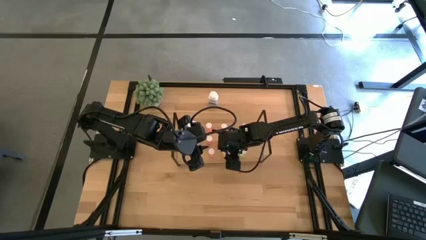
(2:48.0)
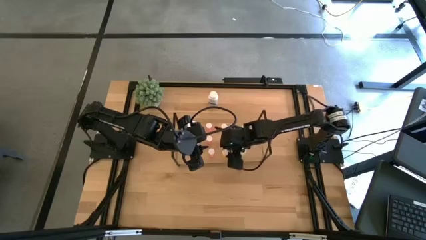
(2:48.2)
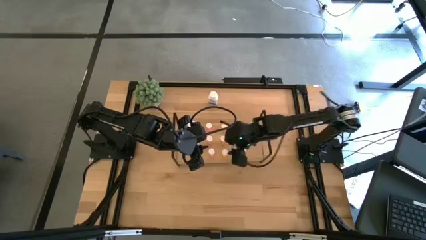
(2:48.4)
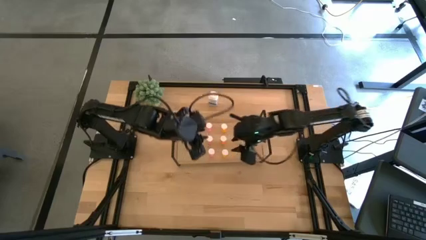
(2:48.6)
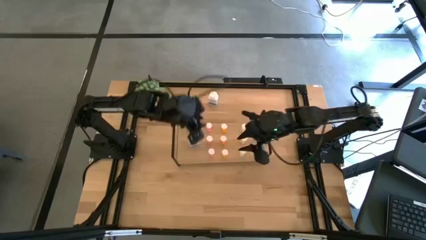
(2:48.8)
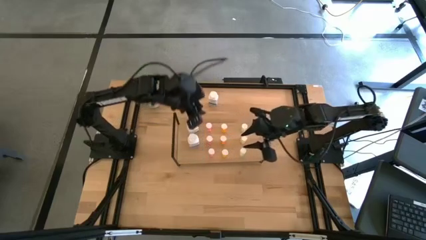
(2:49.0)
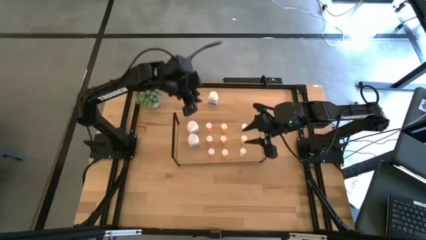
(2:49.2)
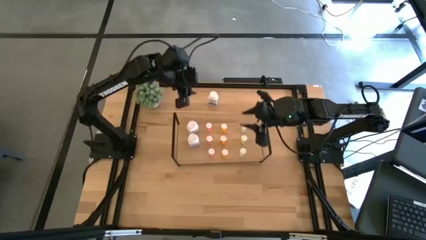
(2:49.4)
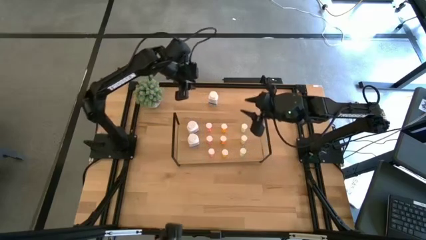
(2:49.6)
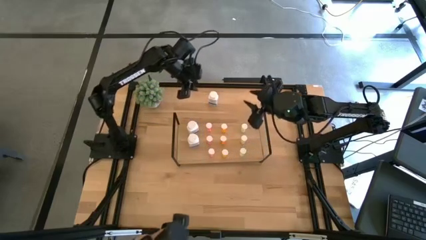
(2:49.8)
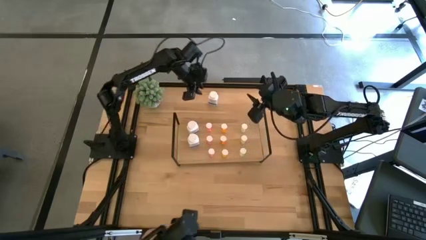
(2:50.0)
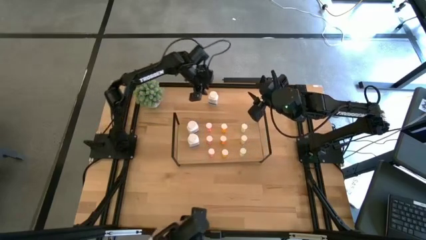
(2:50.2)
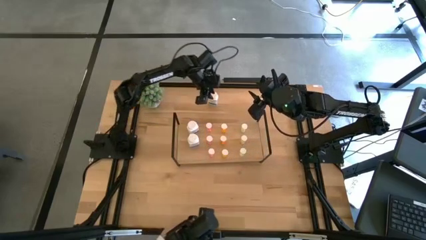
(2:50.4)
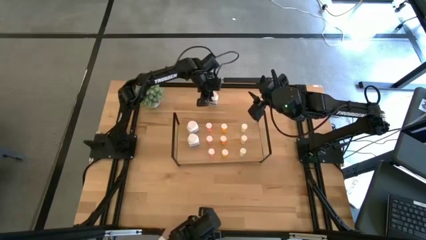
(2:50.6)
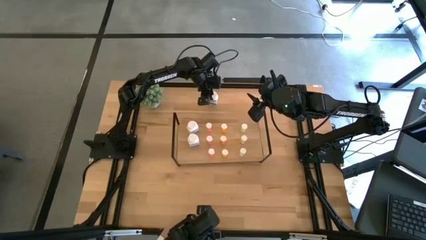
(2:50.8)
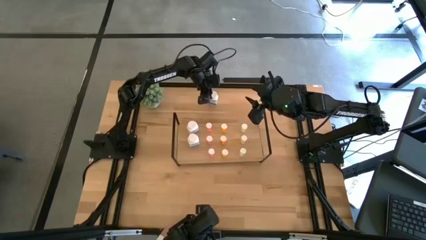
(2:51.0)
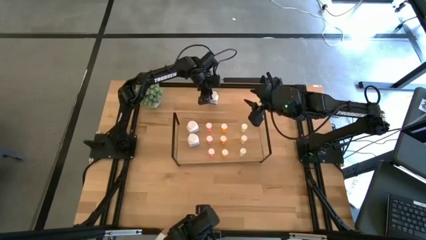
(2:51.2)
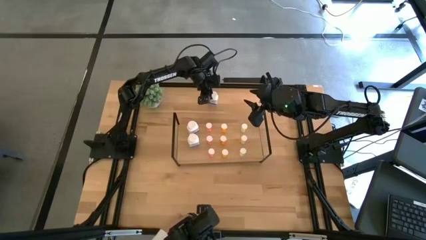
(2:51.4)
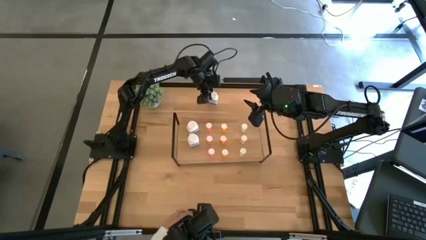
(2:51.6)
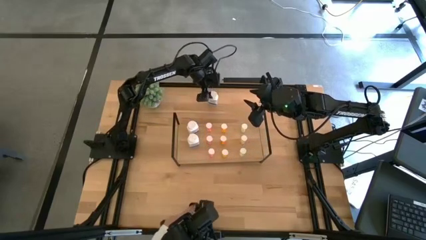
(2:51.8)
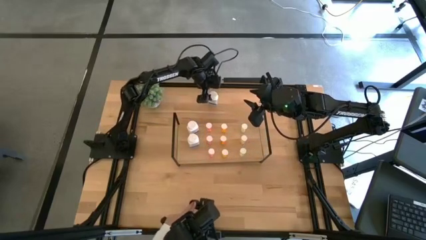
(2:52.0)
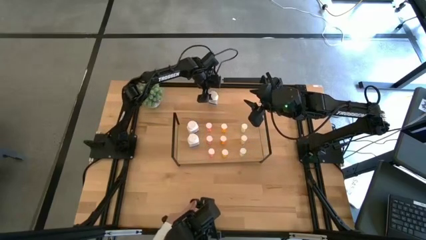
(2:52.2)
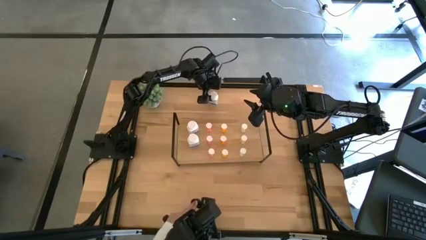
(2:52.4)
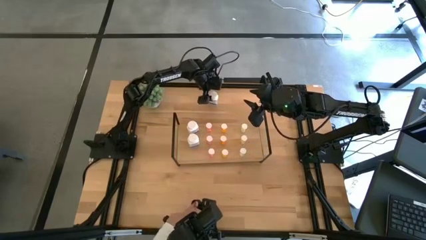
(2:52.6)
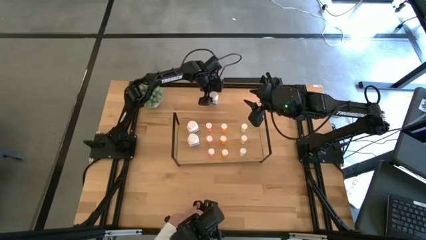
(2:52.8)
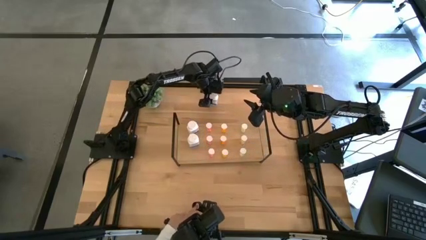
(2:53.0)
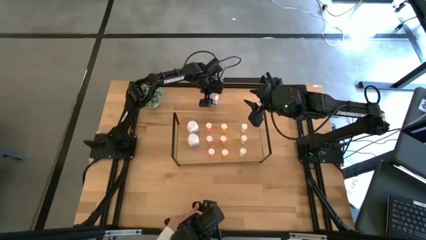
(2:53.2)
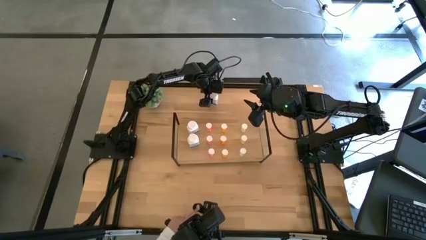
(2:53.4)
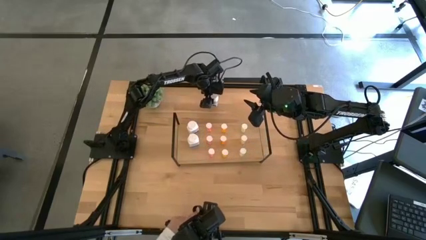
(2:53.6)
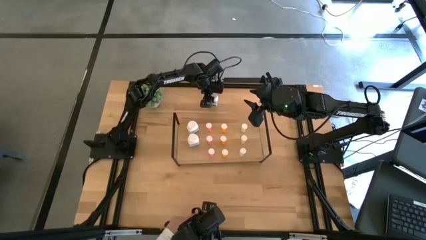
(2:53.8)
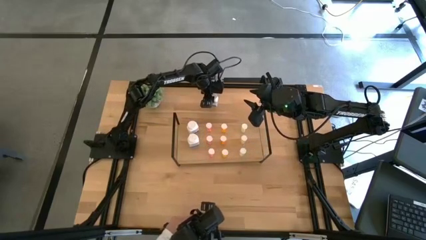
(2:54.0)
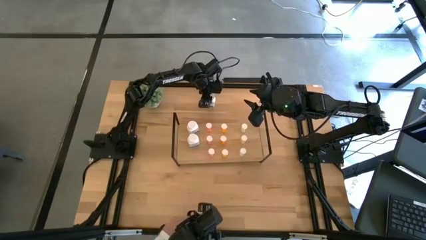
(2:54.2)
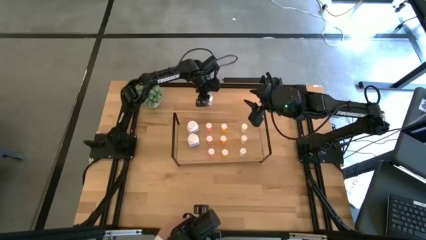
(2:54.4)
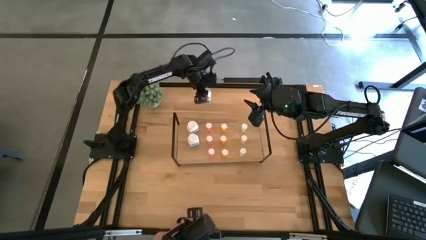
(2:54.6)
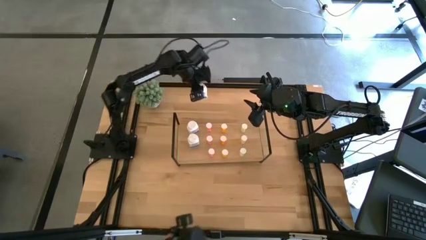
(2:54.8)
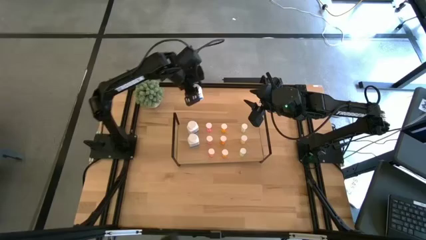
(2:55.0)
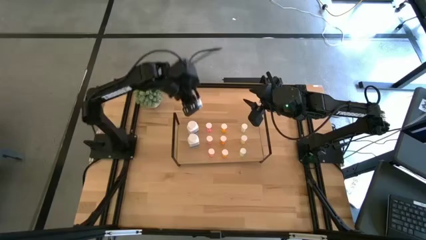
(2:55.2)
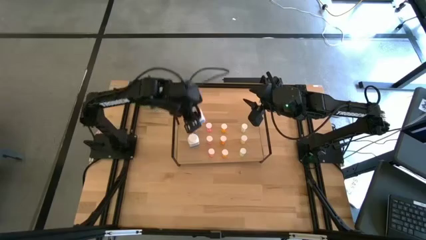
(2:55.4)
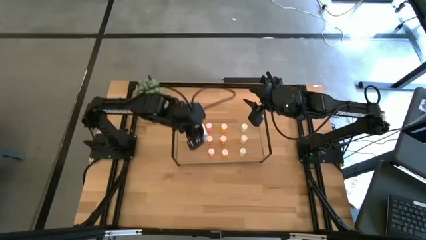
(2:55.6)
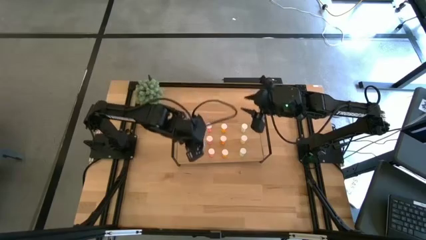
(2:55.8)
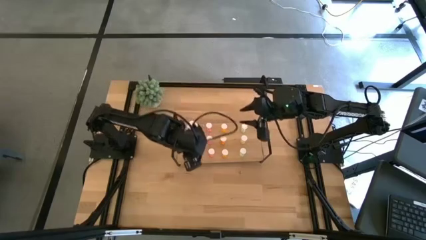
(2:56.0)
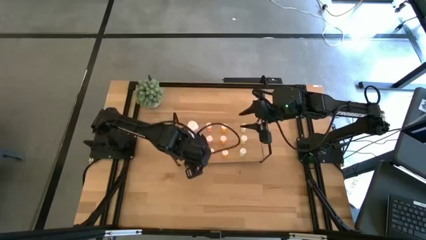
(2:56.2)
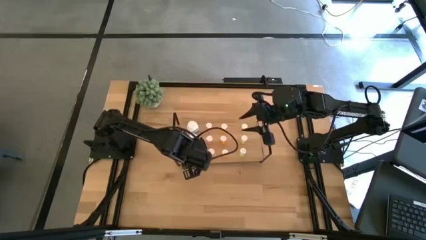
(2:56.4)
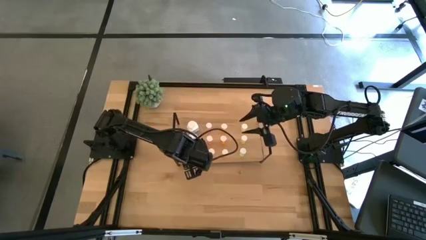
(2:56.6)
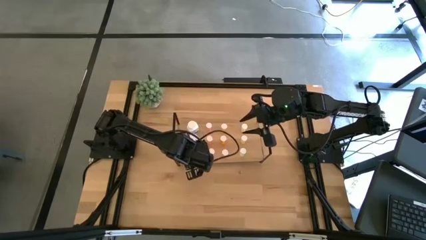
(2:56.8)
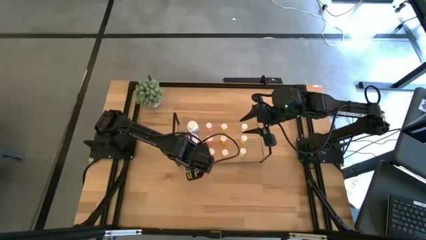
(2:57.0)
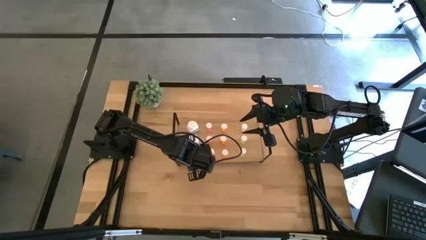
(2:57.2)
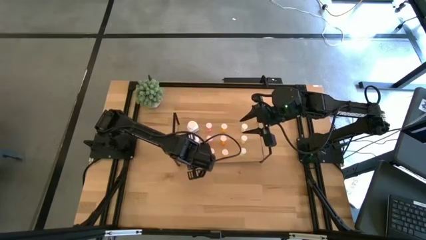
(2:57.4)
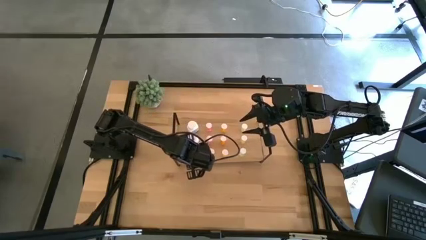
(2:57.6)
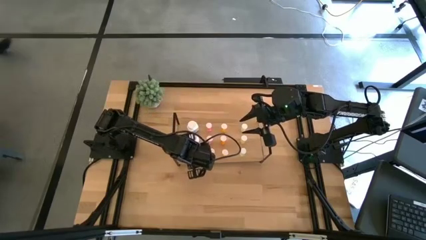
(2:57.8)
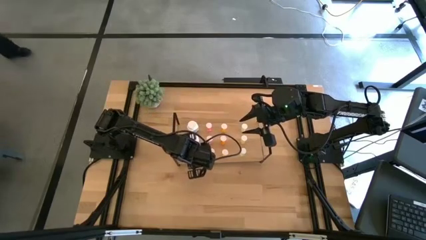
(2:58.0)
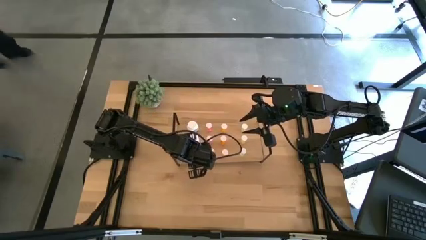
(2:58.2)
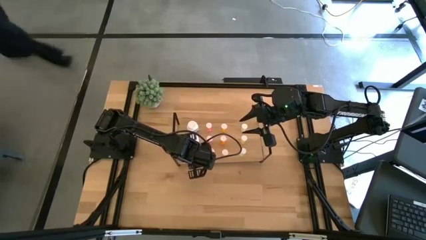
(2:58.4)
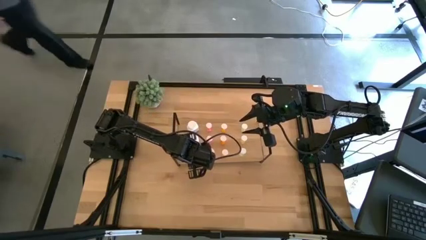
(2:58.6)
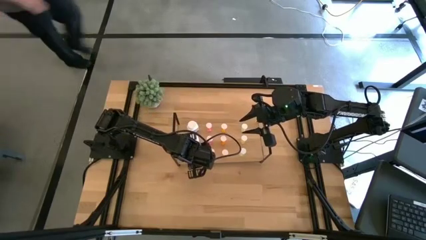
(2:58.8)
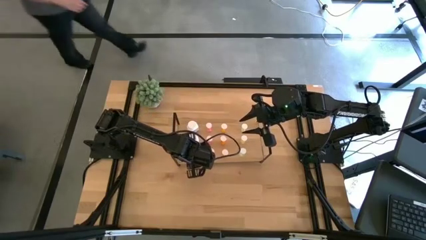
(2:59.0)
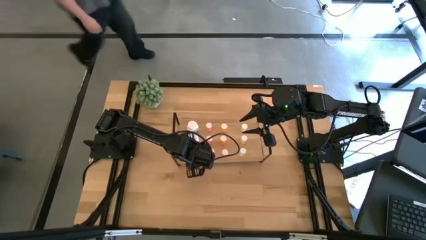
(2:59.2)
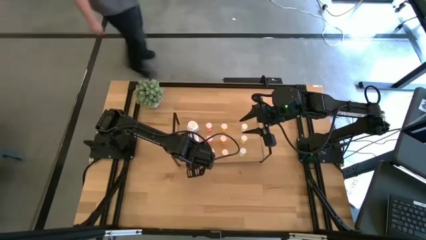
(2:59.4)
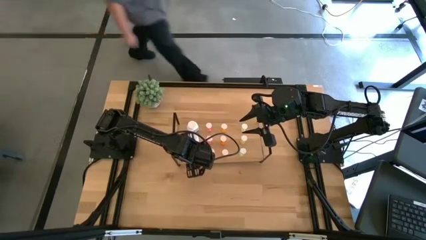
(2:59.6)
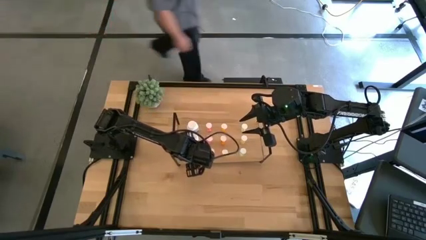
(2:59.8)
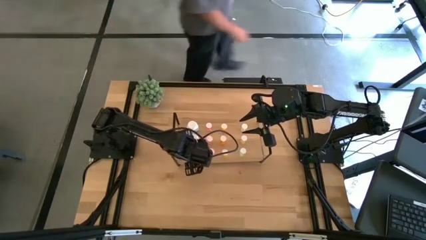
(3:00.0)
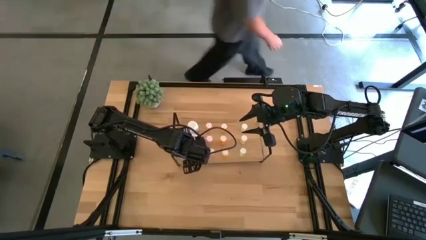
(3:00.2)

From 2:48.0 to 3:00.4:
Task: Pick and place medicine bottles onto shelf by color
Put the white pill bottle on the shelf aligned with the other white pill bottles

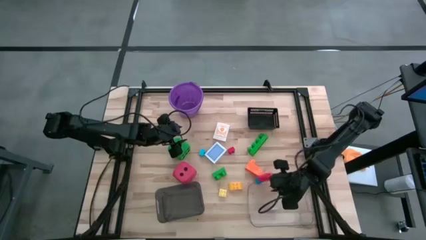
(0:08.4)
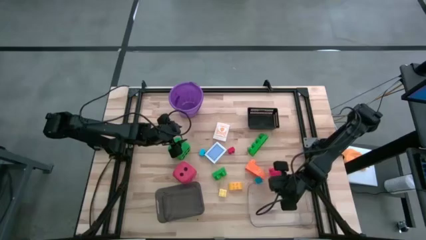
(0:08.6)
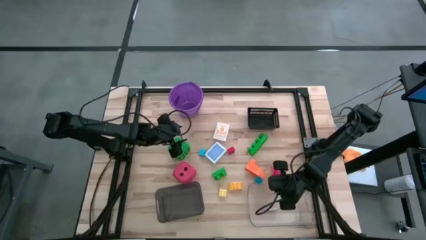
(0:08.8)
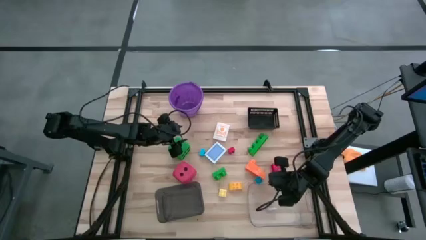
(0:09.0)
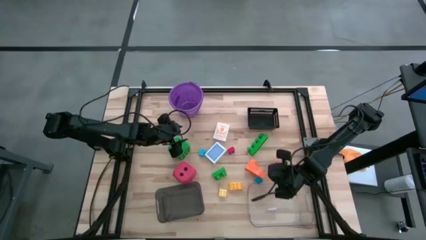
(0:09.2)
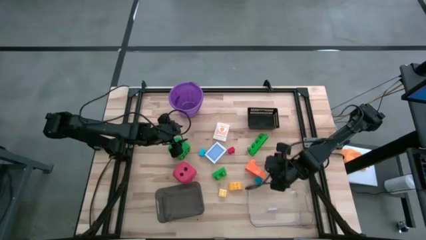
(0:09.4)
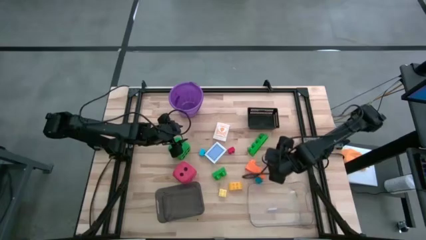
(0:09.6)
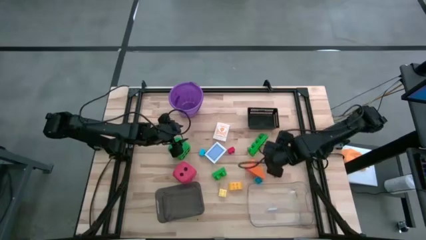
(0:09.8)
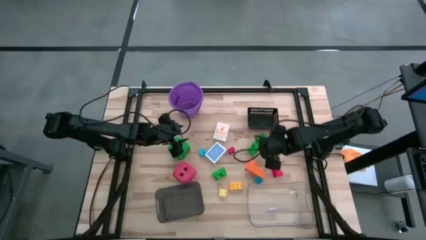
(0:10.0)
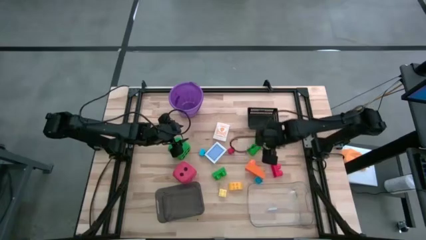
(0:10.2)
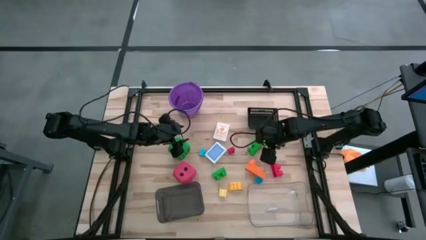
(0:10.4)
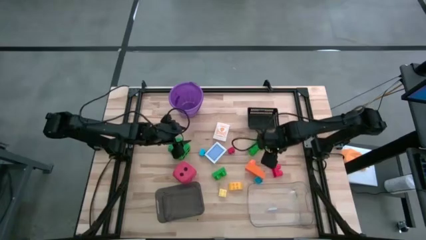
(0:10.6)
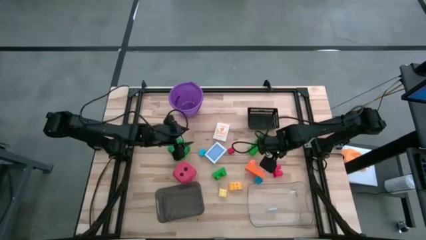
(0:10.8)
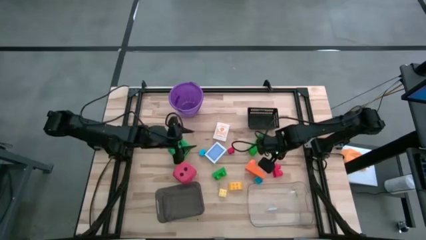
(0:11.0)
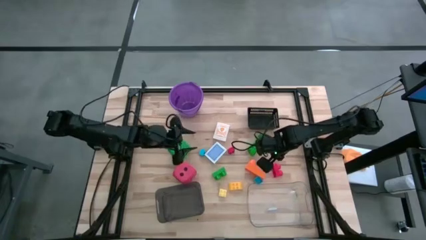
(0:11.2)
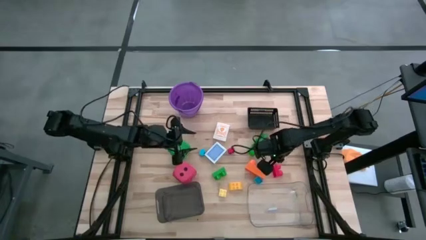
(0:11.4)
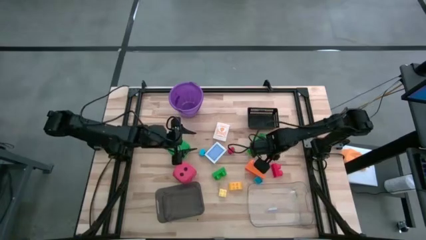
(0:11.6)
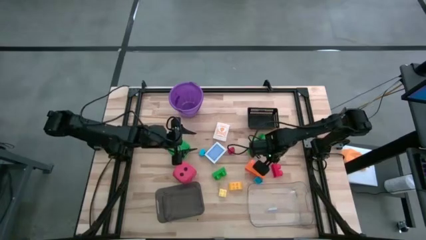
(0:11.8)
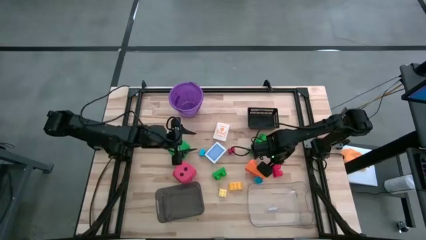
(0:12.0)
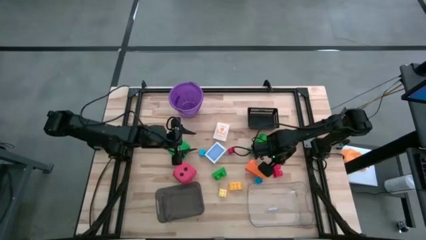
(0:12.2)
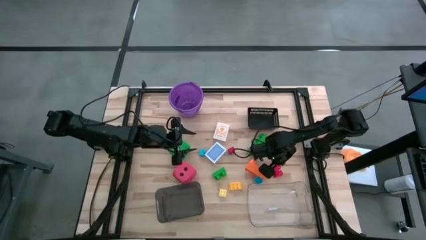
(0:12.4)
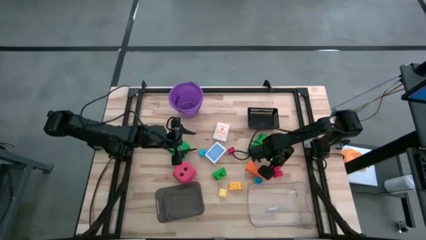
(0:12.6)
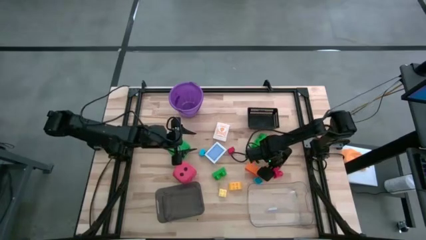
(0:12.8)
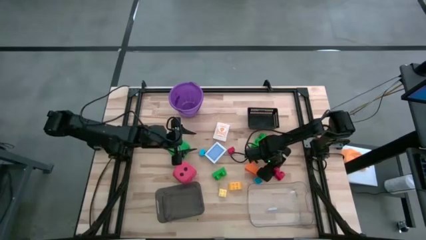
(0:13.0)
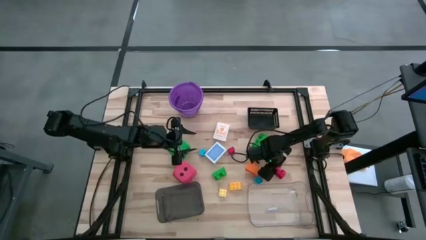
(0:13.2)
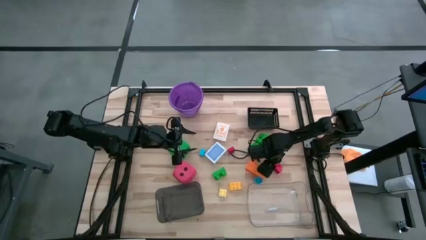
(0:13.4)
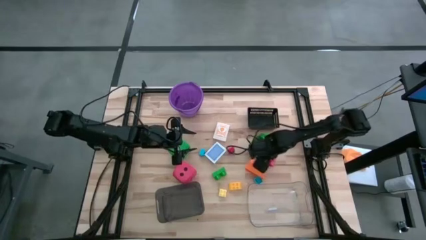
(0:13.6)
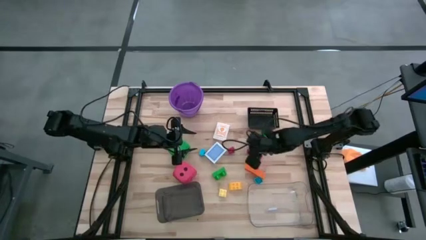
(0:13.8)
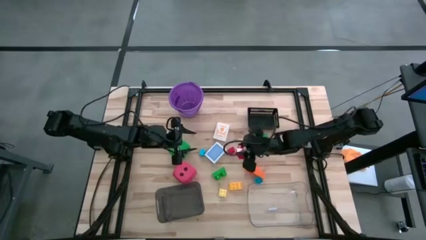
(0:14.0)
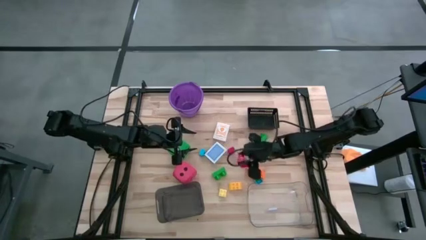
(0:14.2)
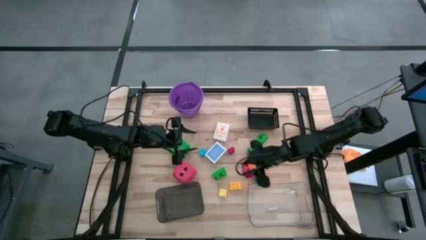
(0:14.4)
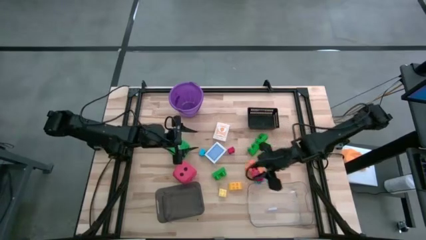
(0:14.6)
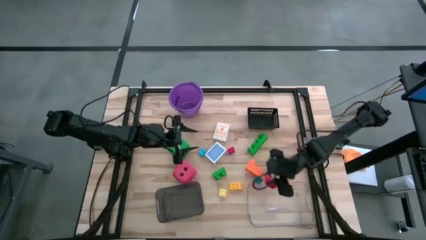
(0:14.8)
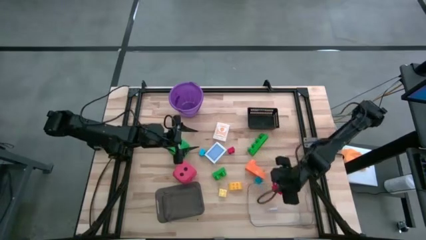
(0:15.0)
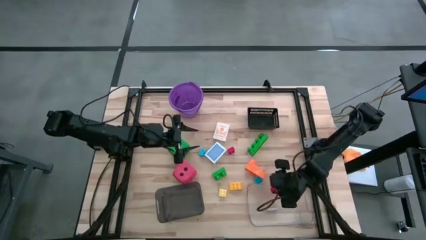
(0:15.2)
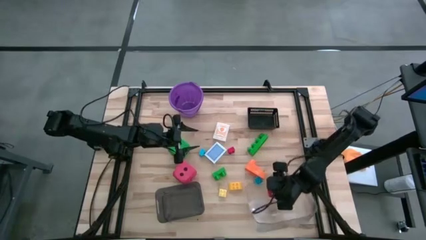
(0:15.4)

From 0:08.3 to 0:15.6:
Task: Pick & Place Toys
Put the large red game piece into the transparent bin
